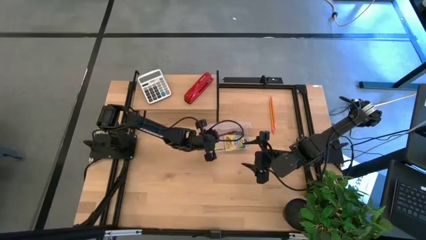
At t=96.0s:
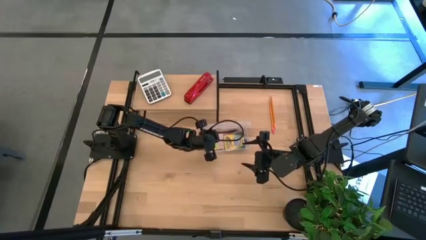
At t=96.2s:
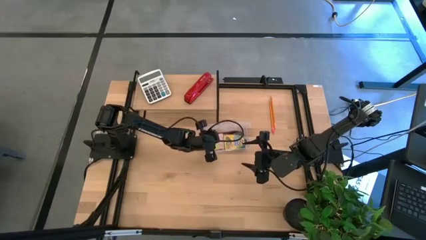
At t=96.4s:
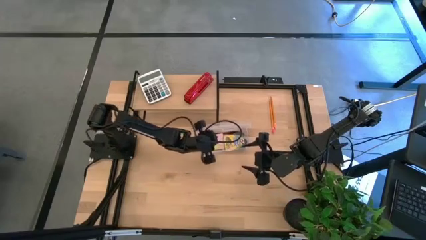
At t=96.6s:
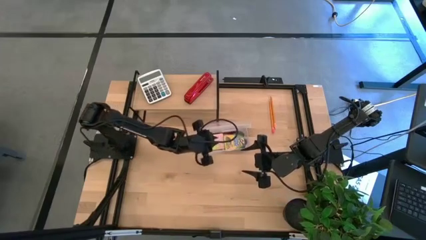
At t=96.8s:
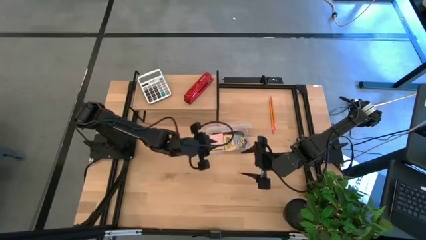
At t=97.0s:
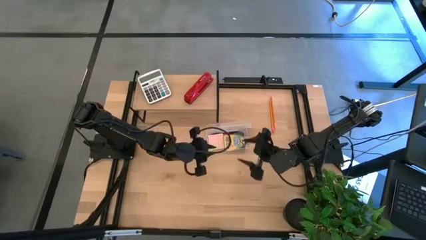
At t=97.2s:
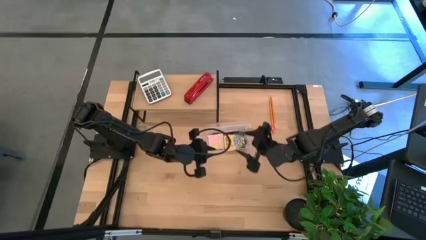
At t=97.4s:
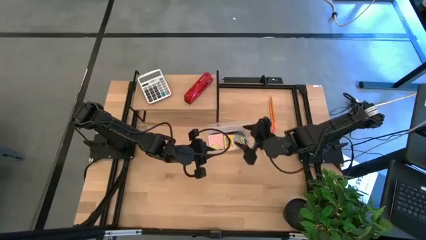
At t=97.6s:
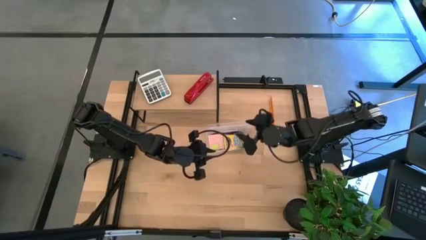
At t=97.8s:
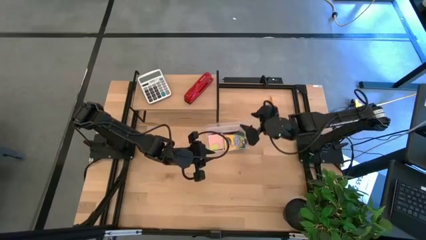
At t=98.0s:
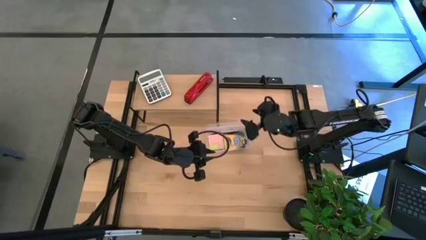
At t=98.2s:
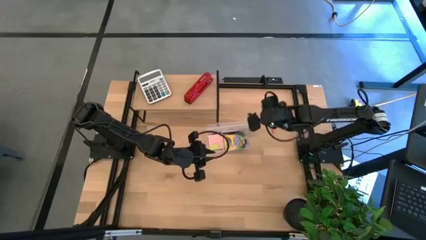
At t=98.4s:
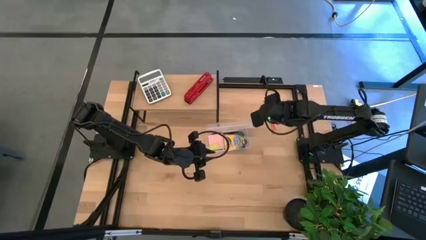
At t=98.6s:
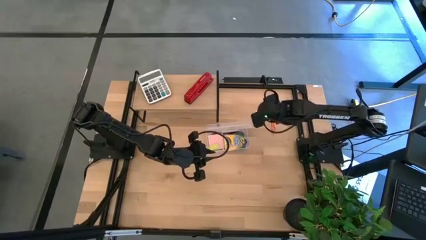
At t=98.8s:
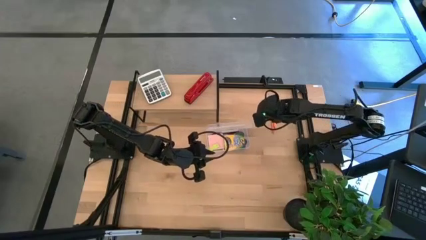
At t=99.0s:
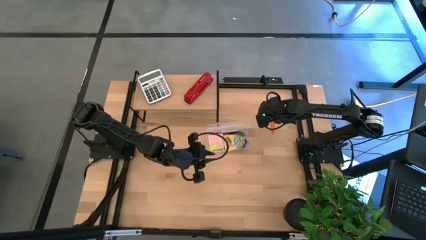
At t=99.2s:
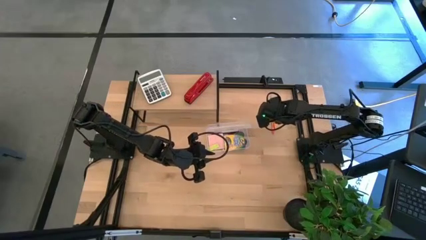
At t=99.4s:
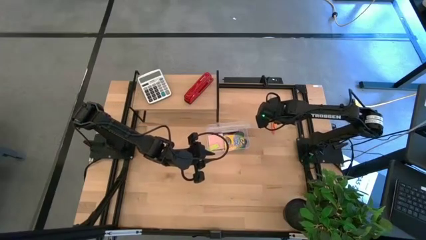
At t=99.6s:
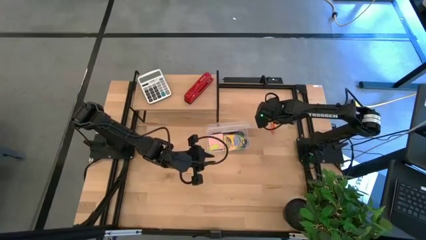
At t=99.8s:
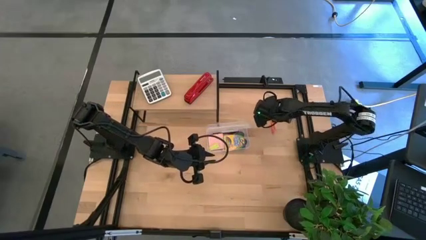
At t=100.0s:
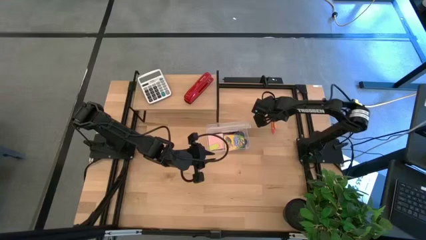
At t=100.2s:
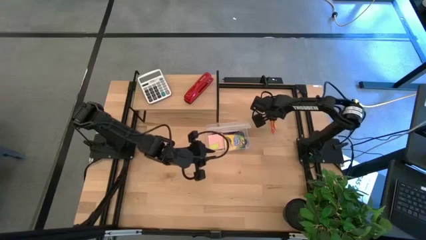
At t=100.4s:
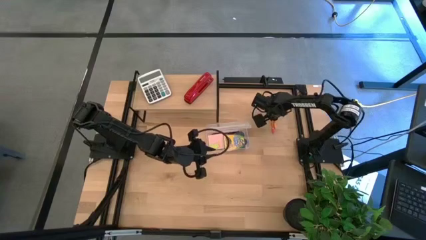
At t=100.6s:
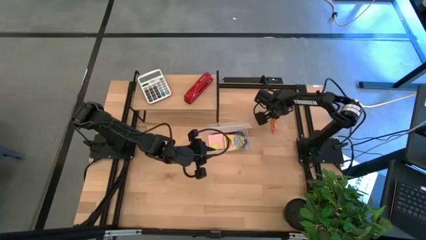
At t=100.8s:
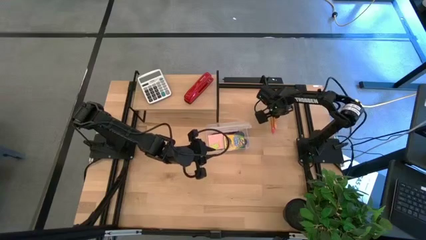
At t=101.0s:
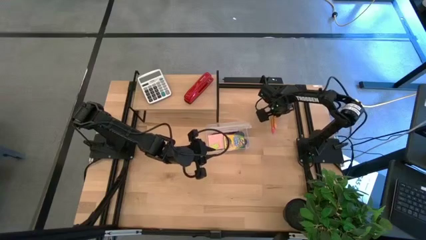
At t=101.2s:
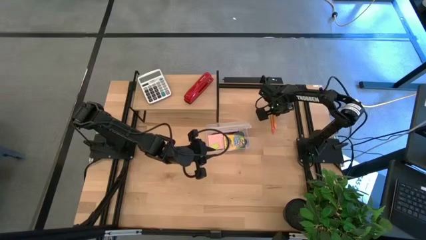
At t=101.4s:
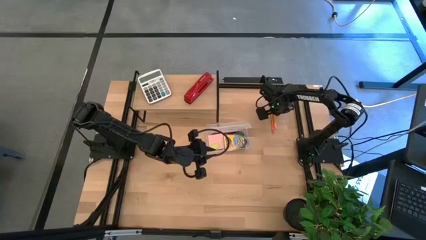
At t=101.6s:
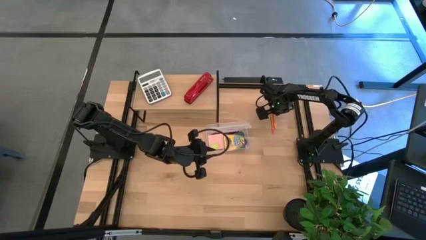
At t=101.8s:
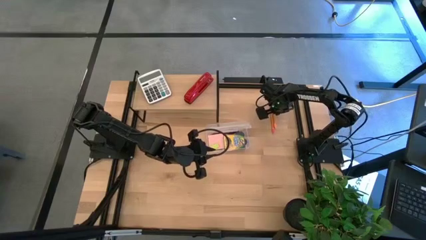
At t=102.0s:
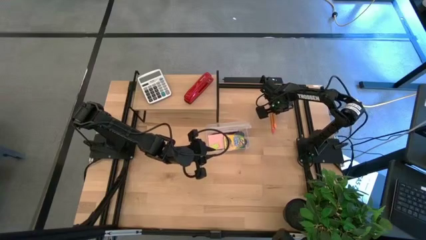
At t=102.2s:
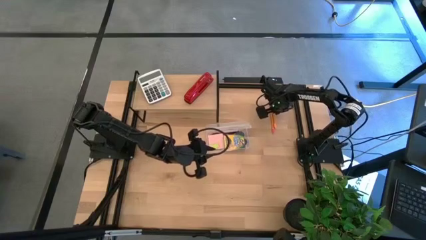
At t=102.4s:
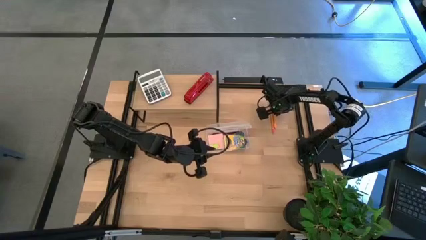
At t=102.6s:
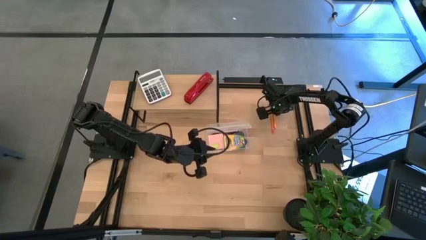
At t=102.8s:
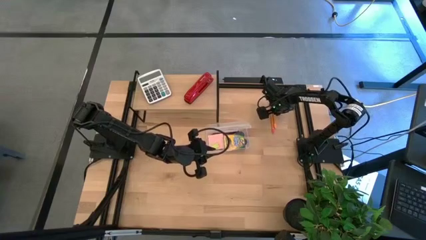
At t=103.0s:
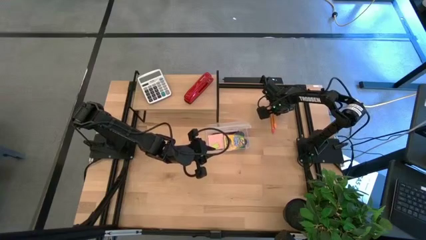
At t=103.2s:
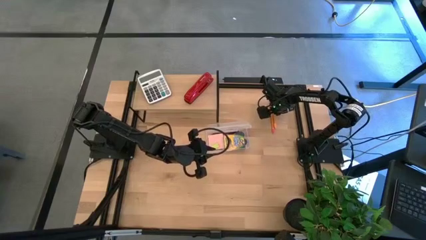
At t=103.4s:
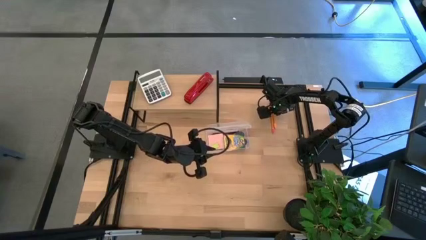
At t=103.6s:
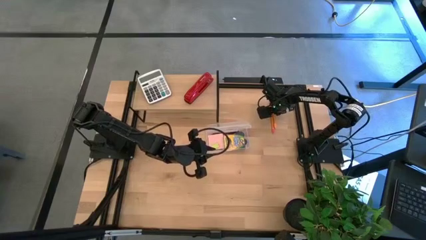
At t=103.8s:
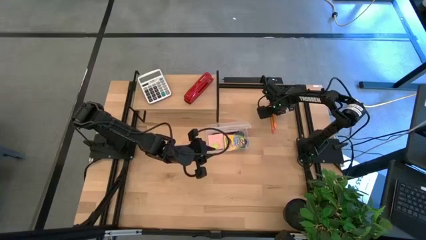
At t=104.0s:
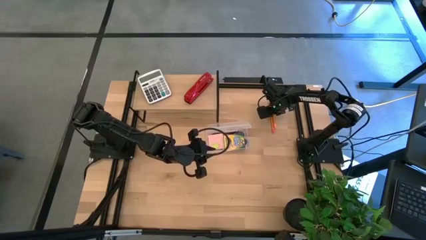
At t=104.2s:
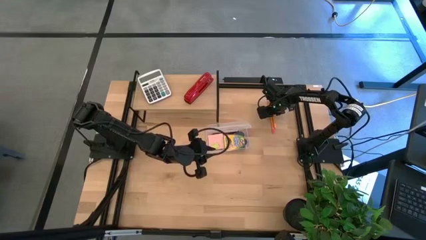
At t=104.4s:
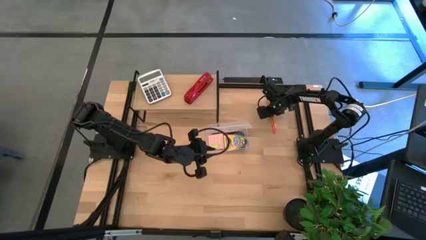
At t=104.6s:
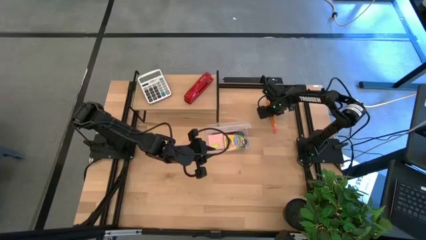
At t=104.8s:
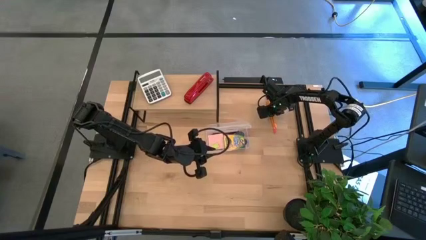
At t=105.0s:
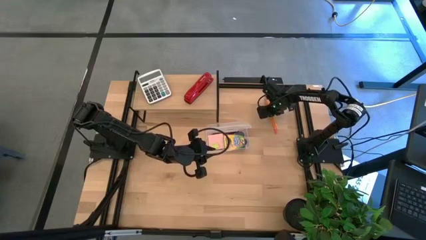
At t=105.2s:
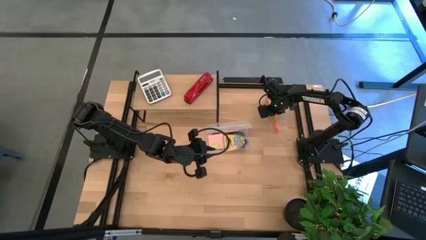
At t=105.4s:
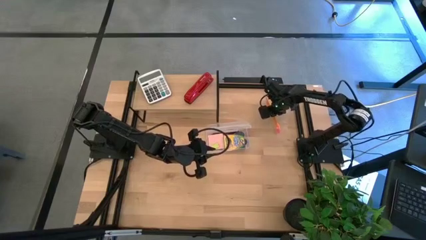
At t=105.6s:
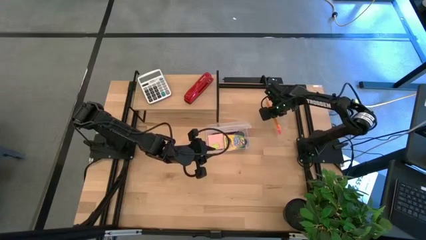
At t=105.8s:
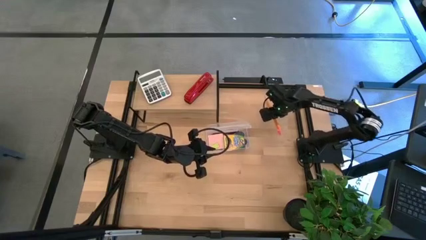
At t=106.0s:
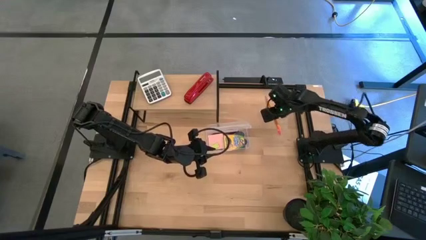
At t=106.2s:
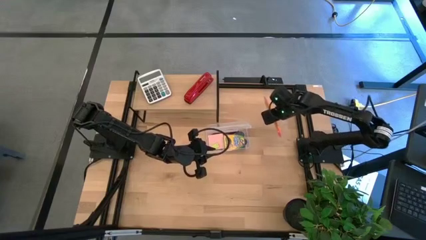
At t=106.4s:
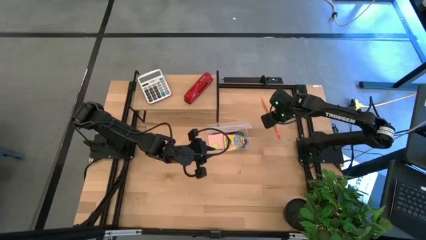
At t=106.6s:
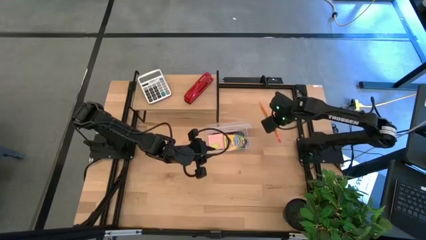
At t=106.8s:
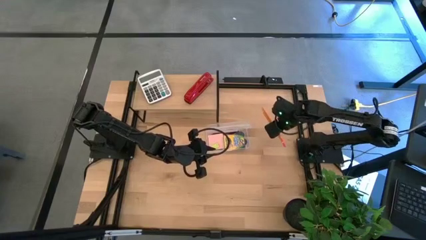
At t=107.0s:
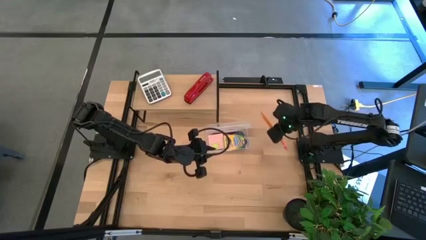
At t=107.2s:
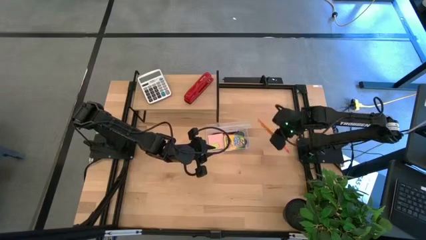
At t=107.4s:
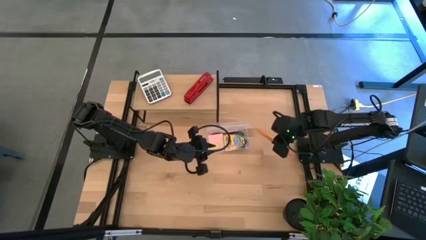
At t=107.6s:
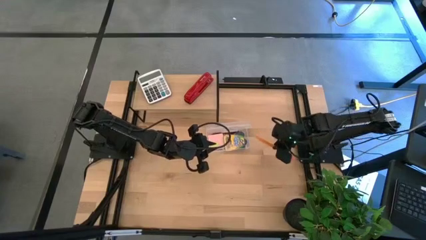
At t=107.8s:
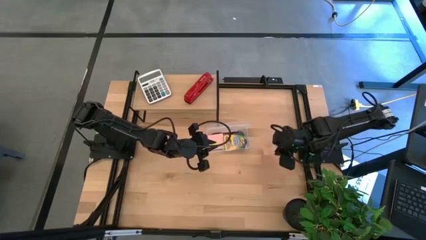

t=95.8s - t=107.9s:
Task: Pack school essentials
Put the top orange pencil into the supply box

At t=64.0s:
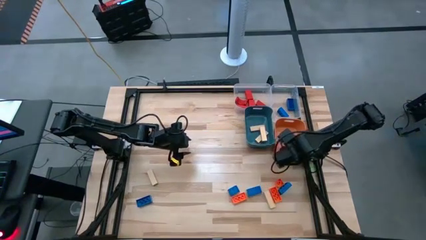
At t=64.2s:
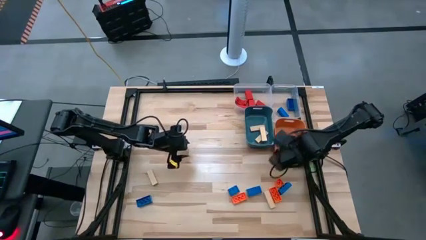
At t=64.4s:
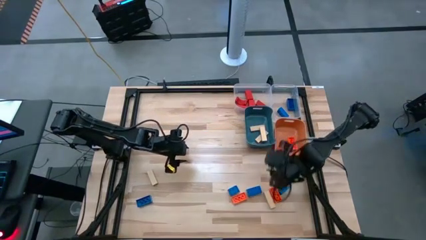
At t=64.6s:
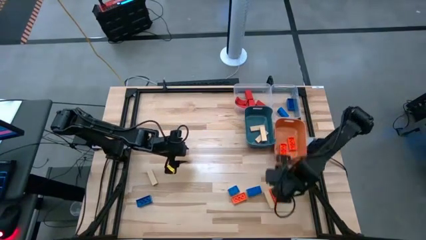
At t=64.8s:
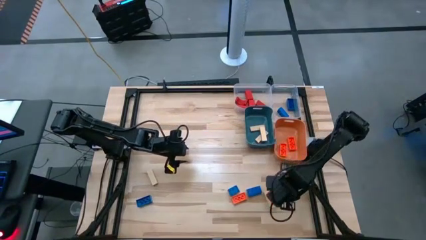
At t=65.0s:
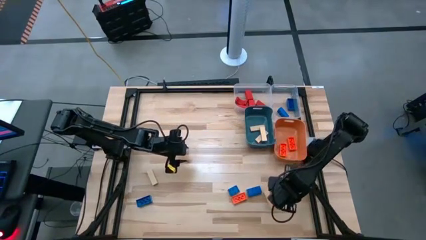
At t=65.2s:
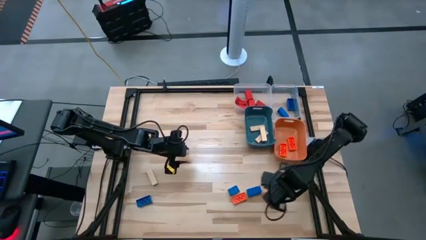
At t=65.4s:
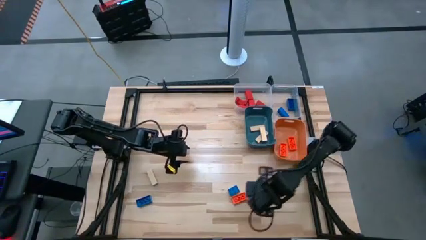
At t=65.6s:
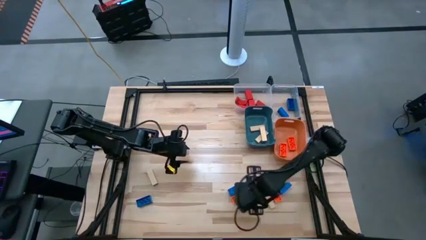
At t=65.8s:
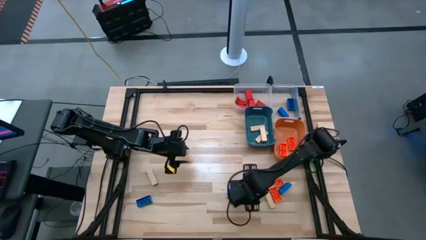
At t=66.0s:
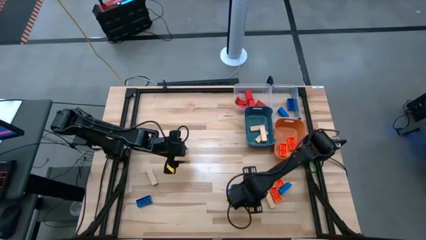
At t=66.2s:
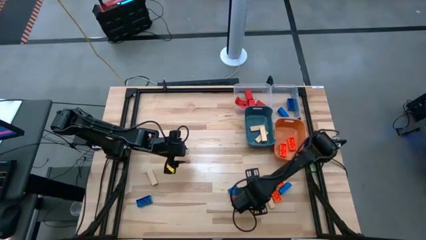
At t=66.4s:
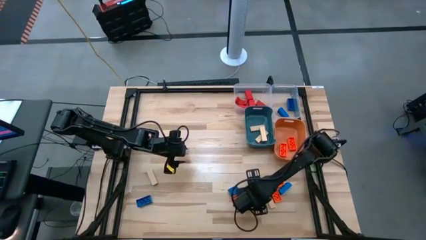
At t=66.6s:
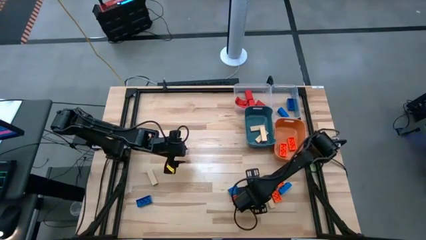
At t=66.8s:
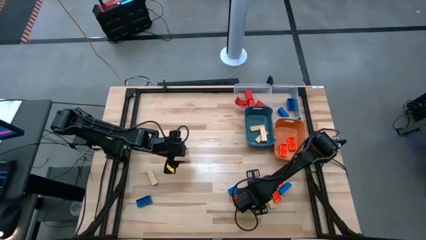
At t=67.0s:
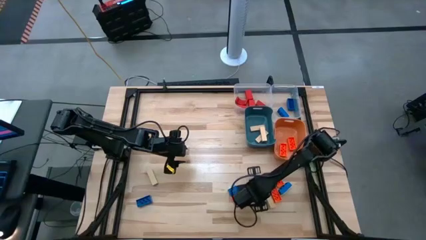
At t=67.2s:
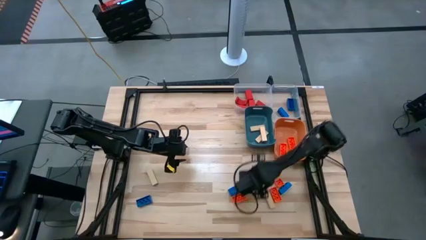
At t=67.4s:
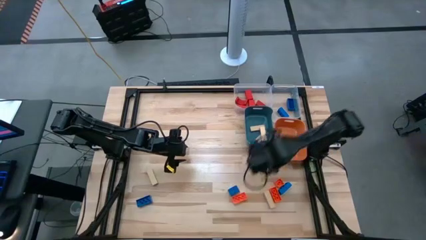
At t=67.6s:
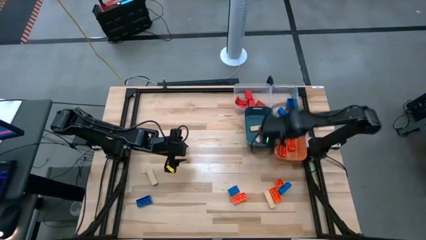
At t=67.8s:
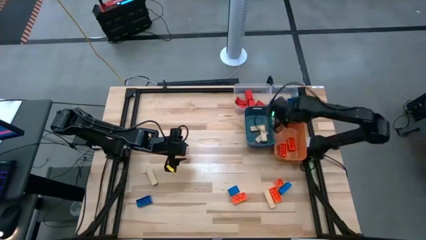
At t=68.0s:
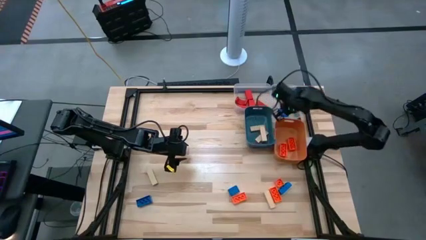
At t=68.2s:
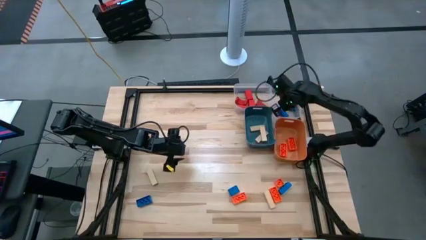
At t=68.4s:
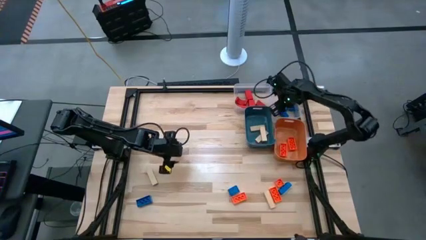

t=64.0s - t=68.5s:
Task: Sort blocks
Put the 8 stud blue game piece into the right transparent bin
